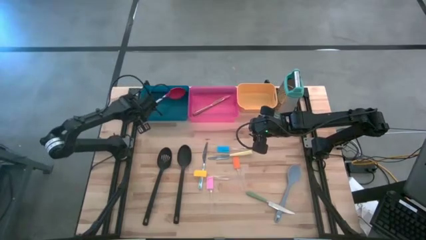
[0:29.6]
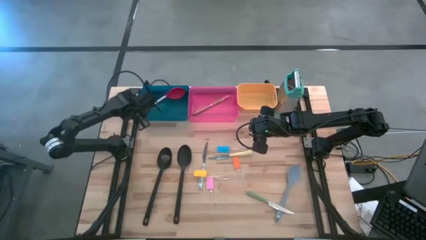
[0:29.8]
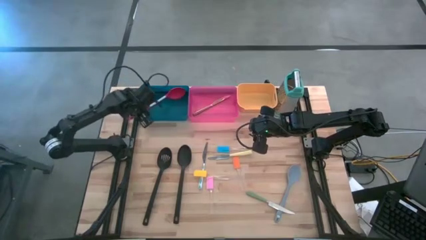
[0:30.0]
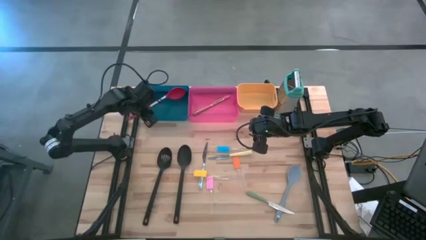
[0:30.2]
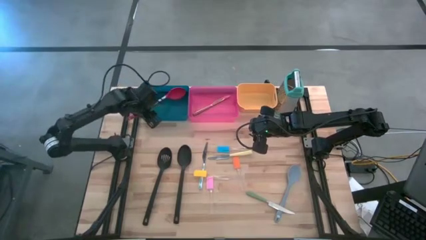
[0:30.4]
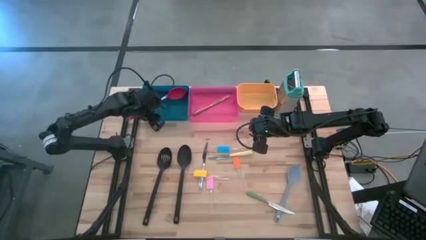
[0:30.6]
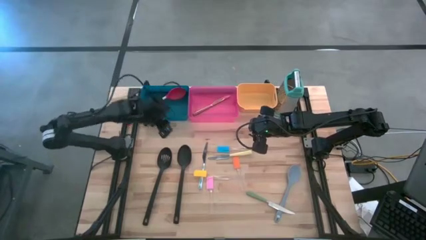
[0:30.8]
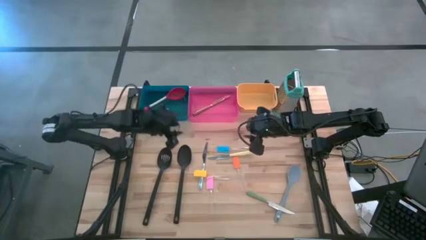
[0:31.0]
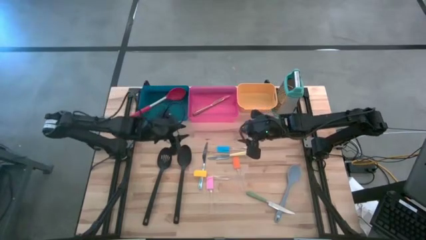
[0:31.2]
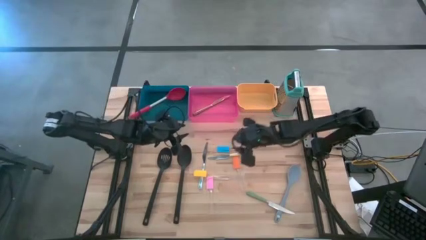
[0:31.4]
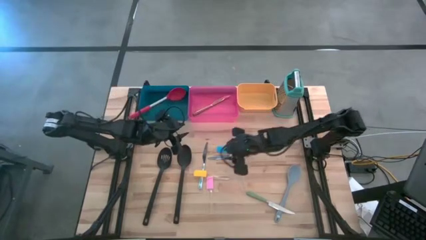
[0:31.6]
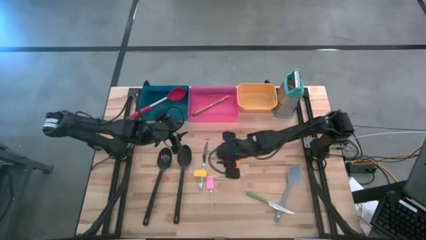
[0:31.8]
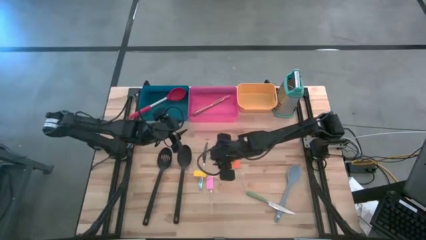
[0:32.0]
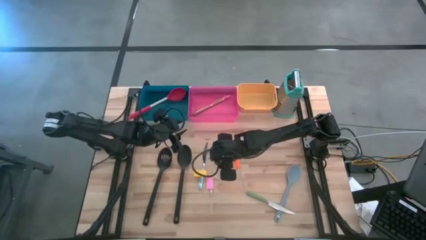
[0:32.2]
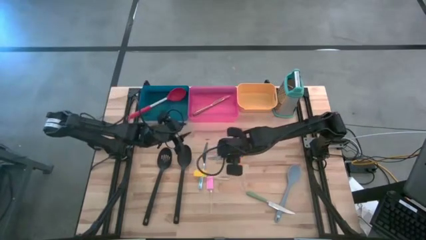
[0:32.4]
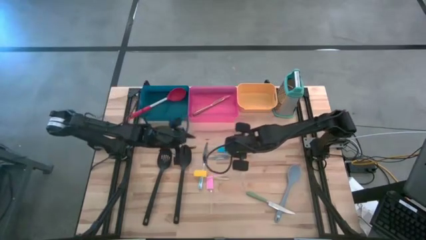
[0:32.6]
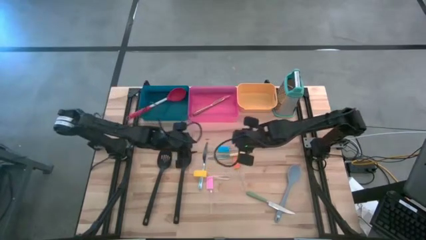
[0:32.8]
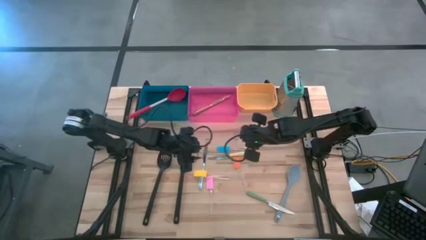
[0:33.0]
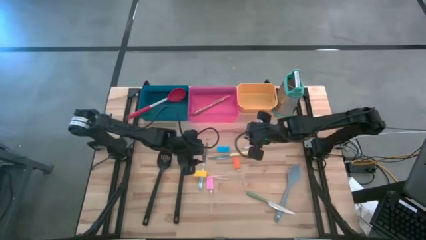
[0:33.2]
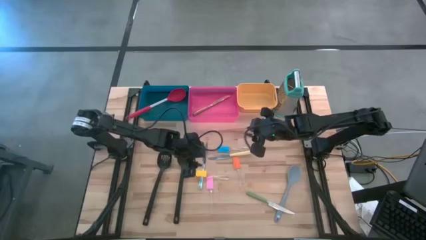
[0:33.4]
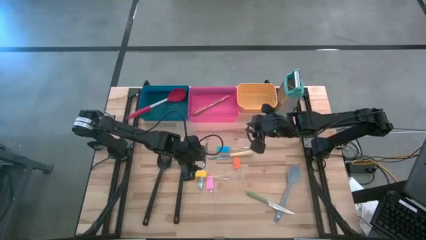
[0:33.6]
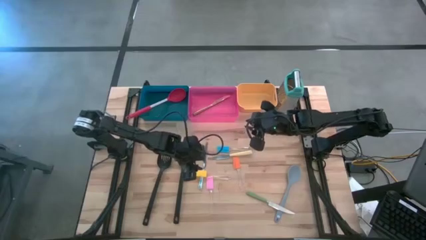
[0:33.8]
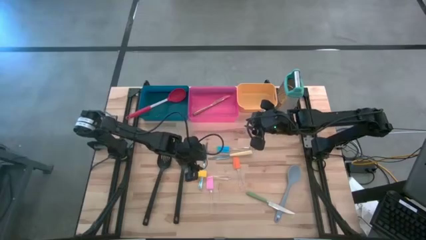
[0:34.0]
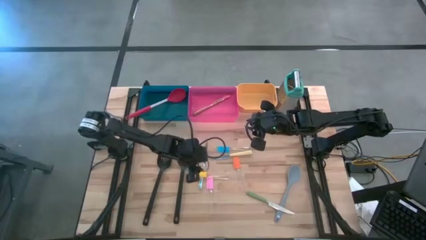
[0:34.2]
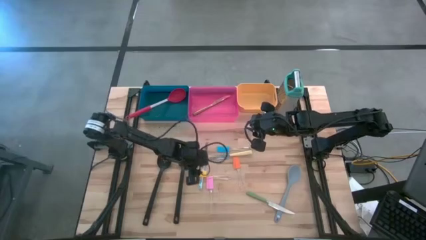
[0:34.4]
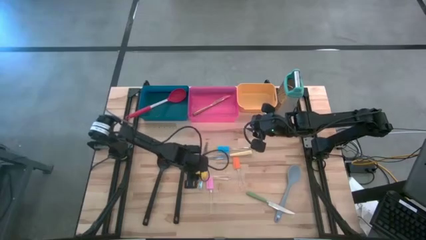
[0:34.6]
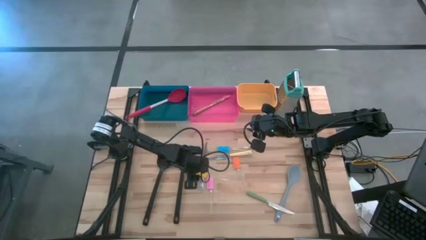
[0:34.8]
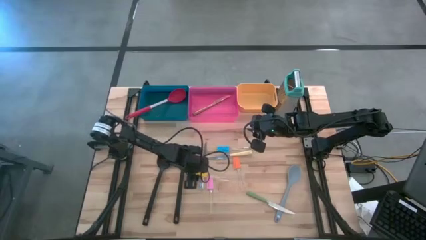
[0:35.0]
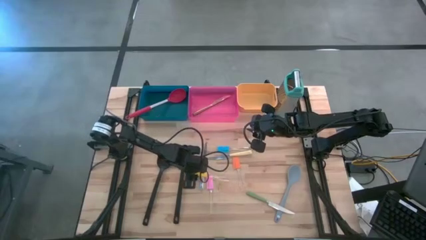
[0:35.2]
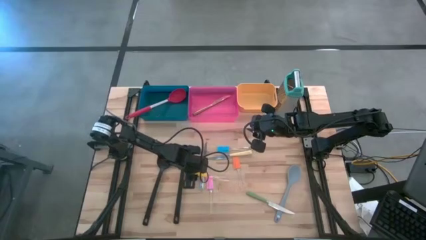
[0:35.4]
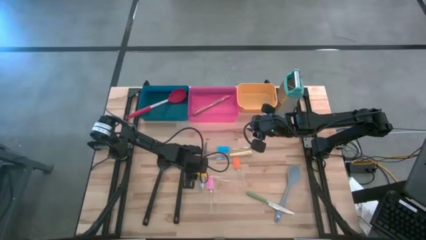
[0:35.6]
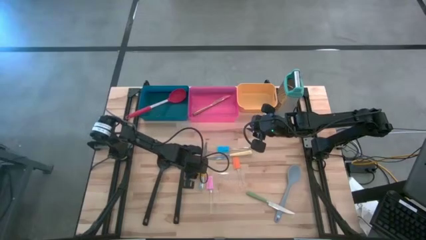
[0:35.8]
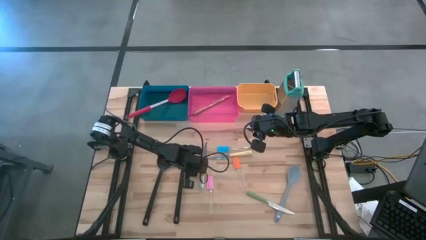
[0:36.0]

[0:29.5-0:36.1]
Task: Pick & Place Kitchen Items
Put the yellow spatula into the yellow bin

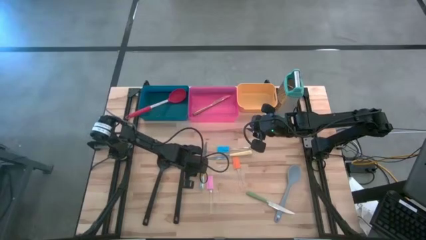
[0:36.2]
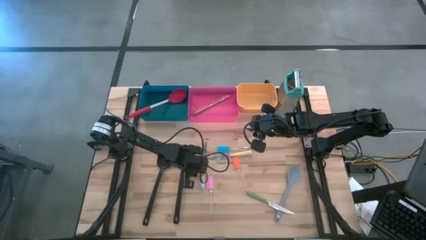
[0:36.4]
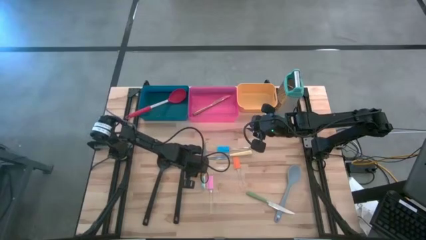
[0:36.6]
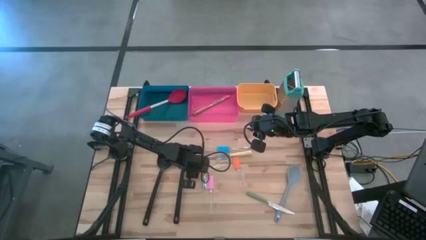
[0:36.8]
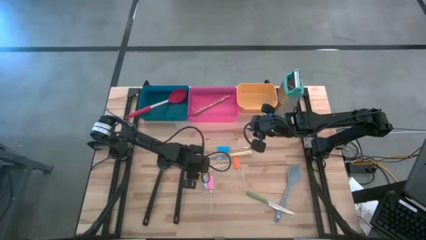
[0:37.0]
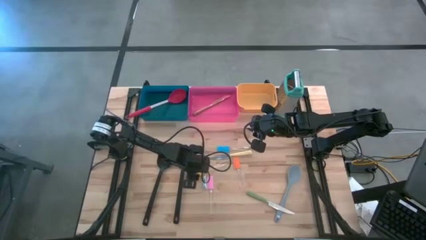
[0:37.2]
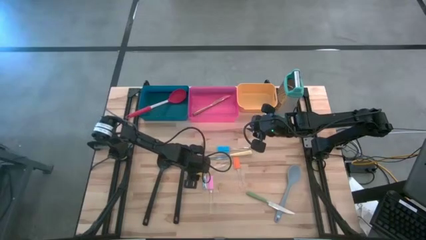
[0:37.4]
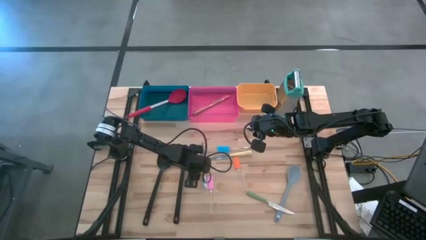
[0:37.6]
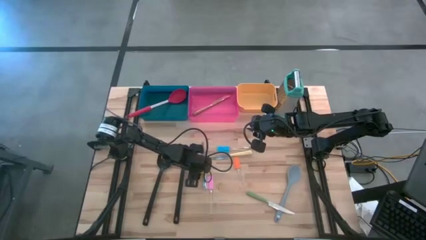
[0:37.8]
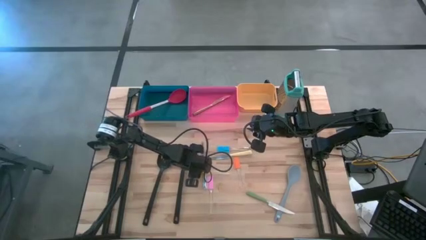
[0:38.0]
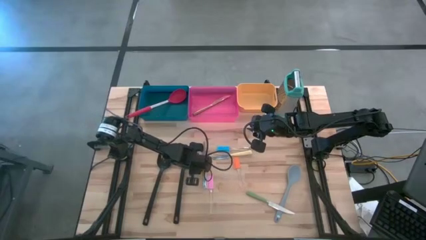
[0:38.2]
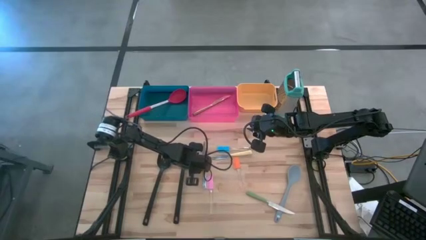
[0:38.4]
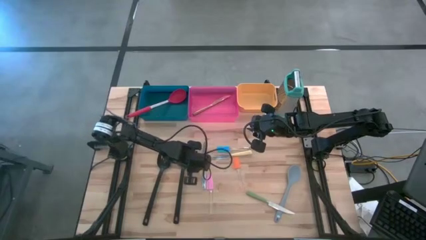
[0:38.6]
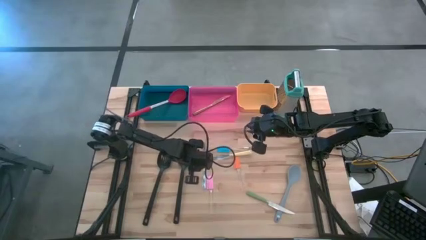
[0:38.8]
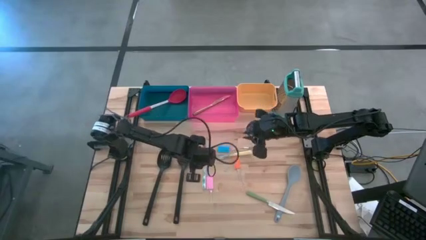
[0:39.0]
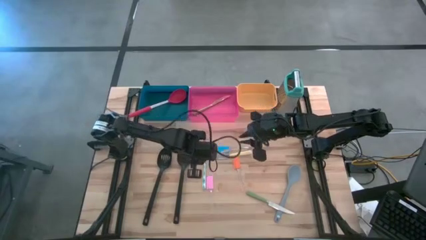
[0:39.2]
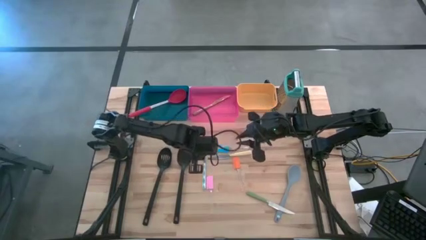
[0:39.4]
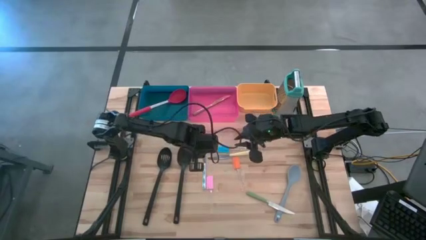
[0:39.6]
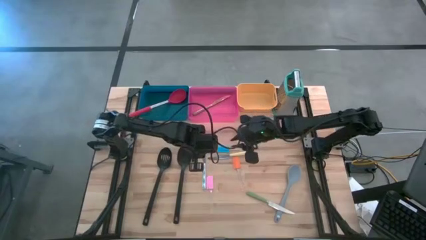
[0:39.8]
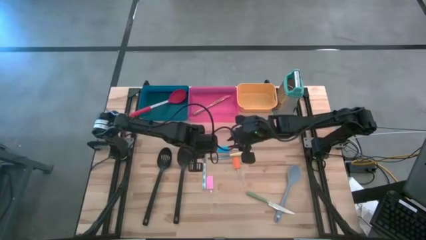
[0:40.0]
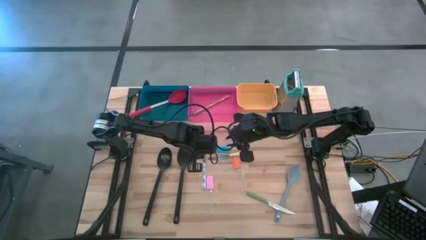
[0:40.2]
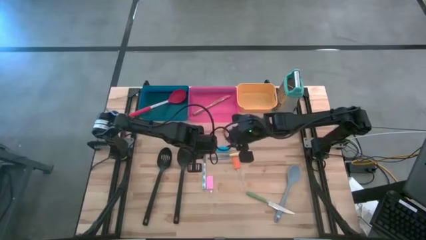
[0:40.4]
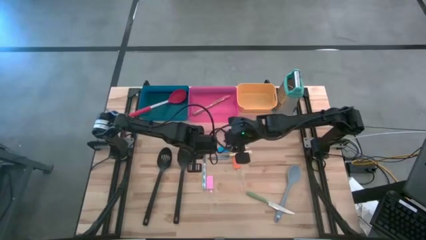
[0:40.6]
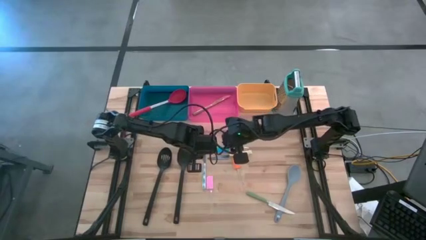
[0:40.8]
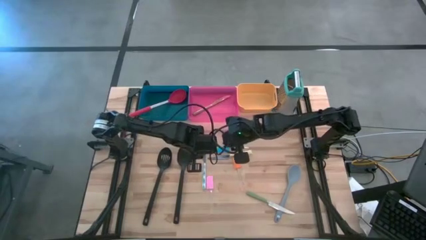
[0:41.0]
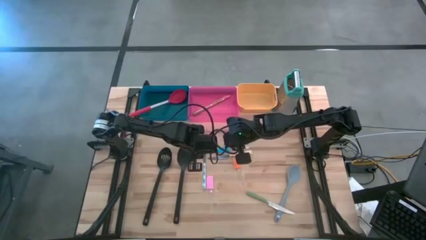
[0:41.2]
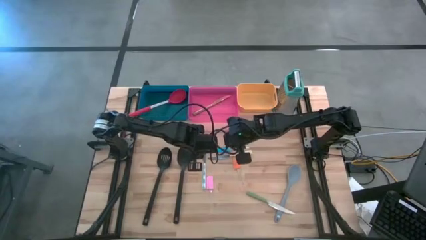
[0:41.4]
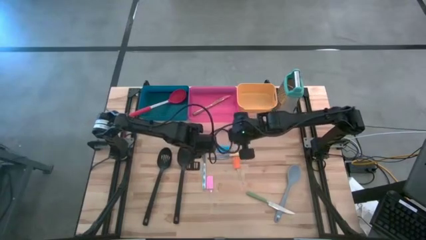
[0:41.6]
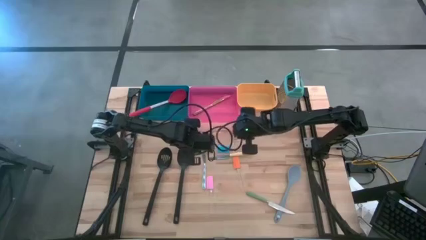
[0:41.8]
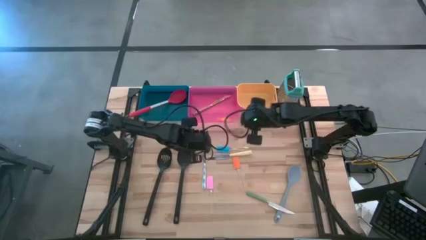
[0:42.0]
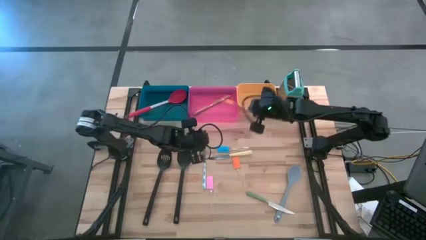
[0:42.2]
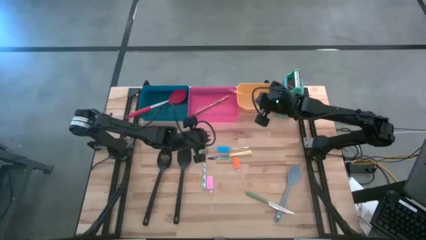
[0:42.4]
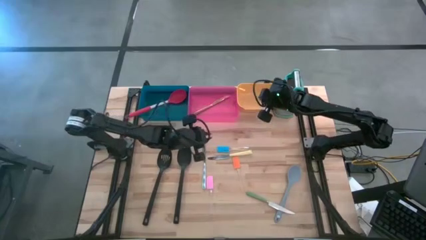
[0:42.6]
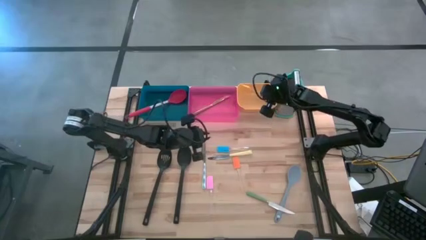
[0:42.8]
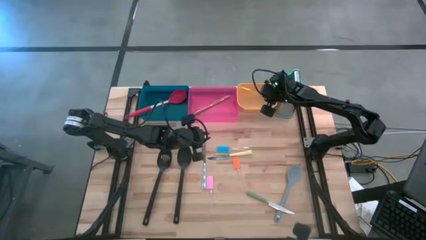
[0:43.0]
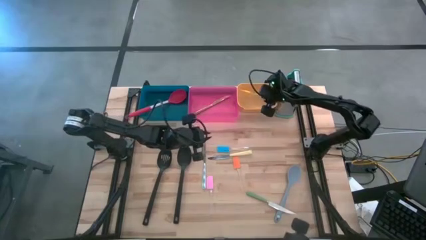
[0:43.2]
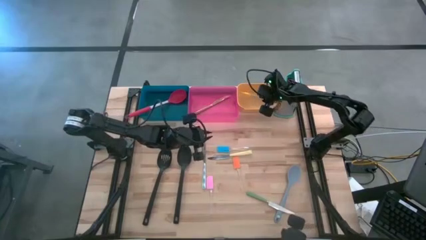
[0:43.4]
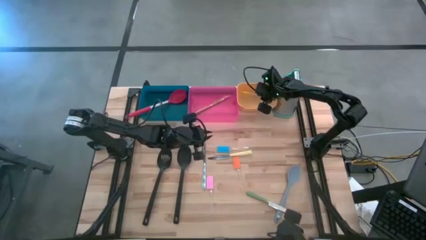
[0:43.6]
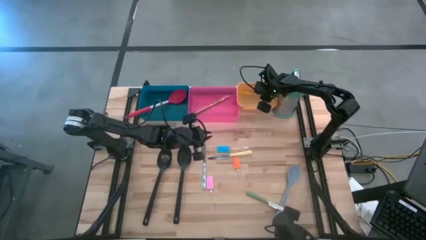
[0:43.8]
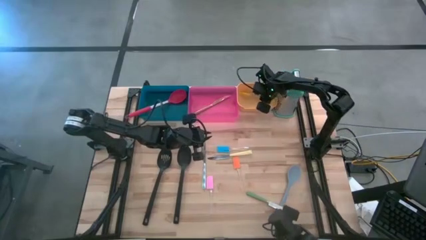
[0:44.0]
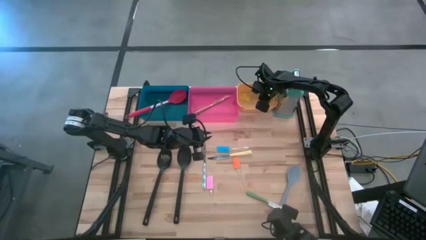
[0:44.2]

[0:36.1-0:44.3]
Put the yellow spatula into the yellow bin
